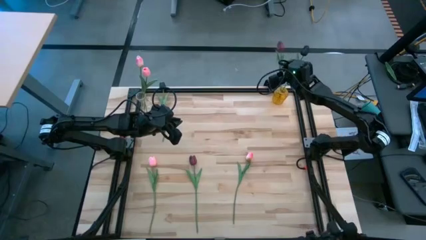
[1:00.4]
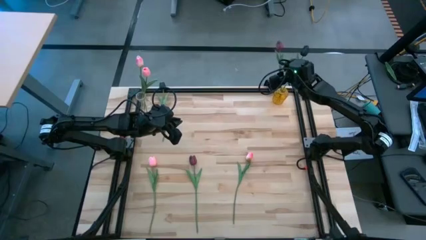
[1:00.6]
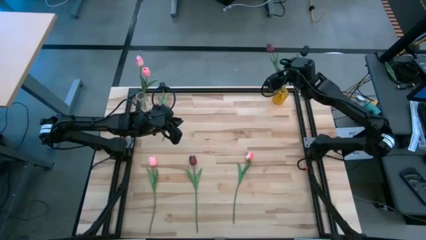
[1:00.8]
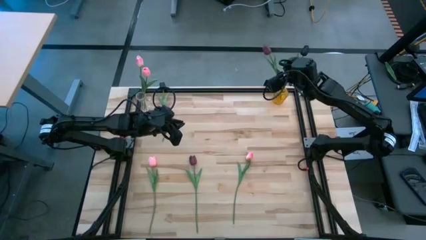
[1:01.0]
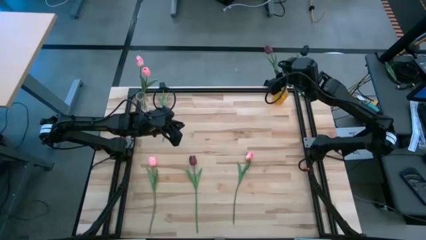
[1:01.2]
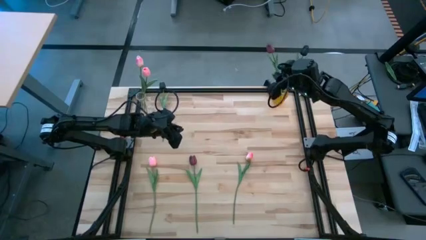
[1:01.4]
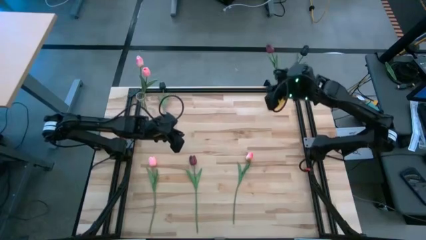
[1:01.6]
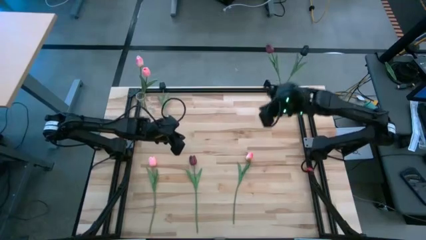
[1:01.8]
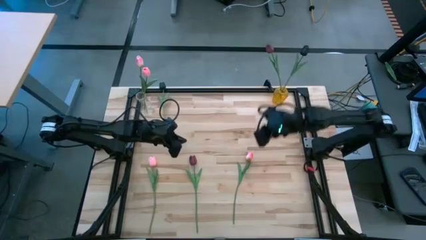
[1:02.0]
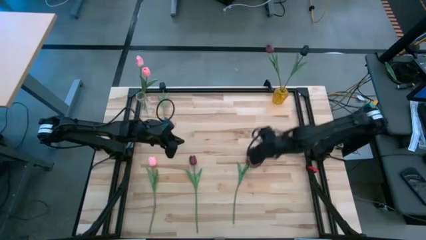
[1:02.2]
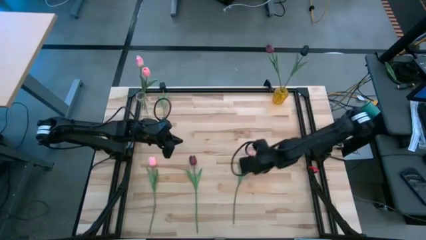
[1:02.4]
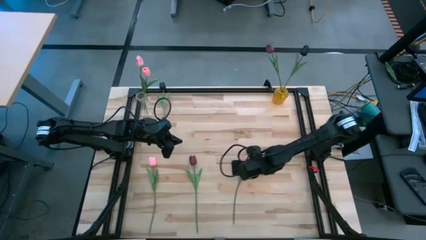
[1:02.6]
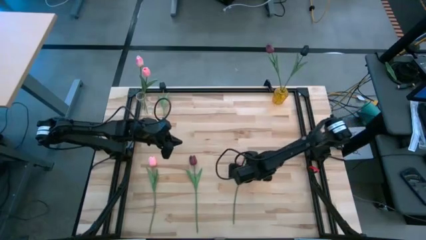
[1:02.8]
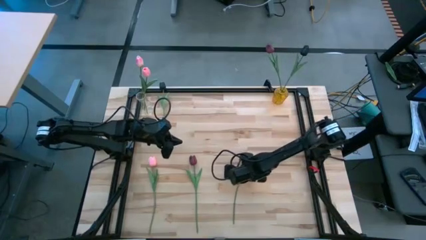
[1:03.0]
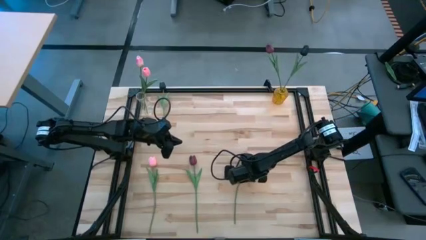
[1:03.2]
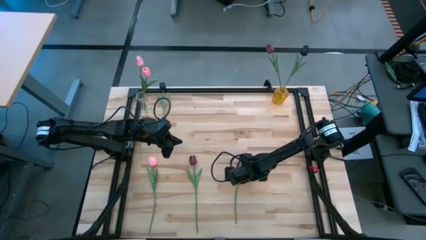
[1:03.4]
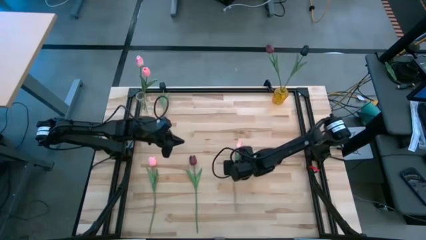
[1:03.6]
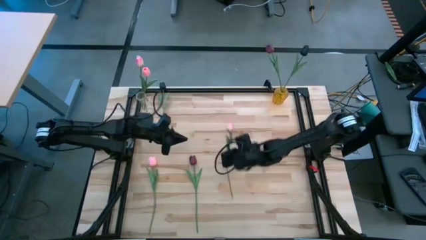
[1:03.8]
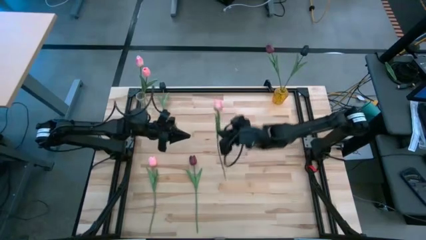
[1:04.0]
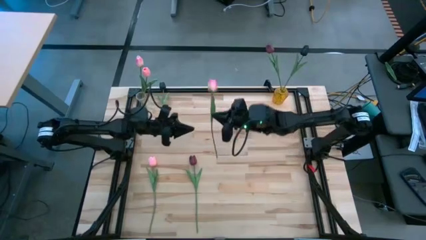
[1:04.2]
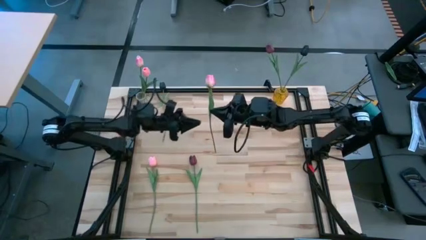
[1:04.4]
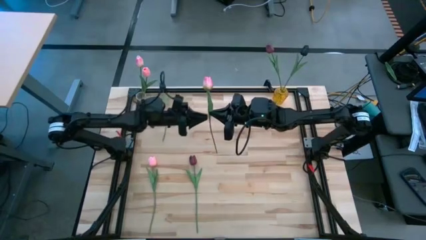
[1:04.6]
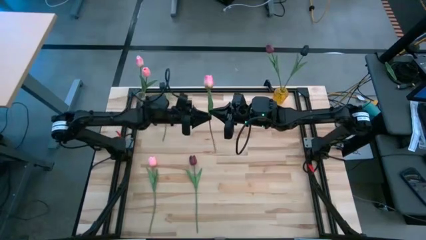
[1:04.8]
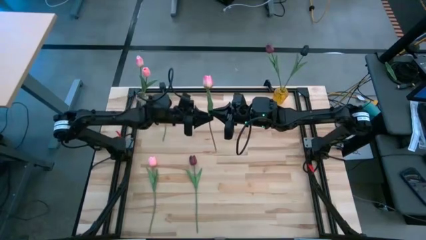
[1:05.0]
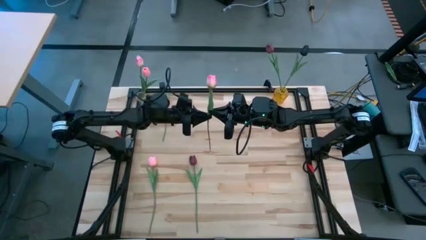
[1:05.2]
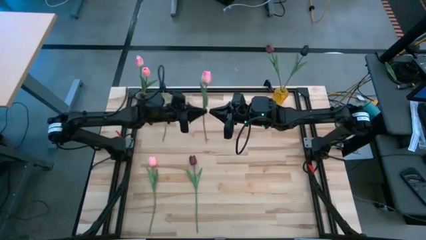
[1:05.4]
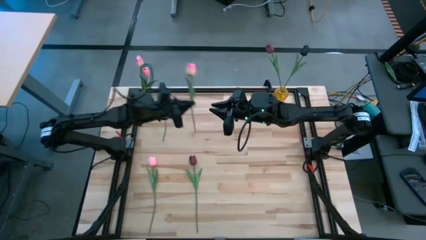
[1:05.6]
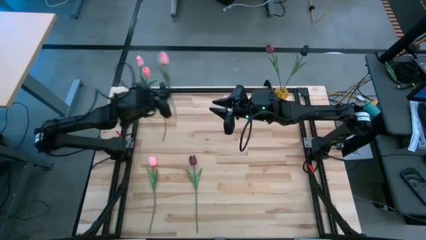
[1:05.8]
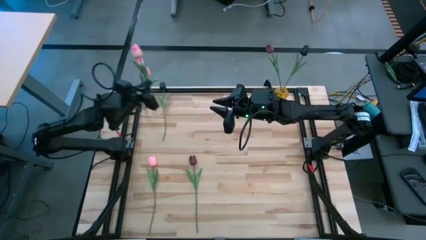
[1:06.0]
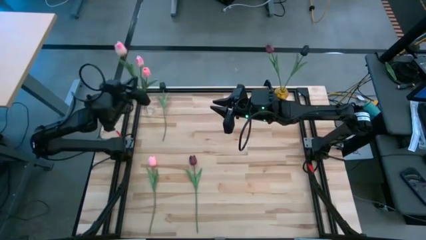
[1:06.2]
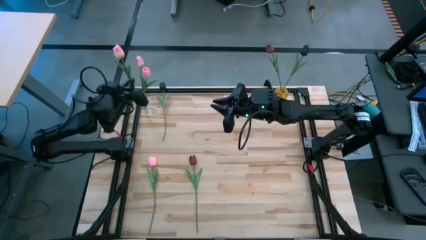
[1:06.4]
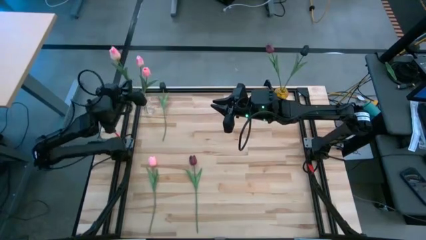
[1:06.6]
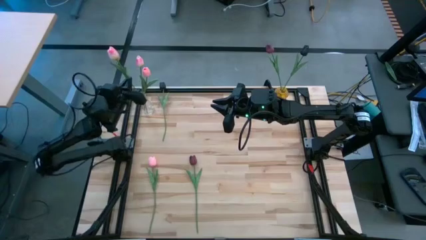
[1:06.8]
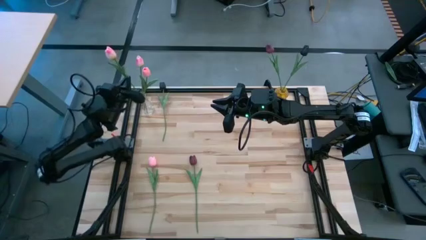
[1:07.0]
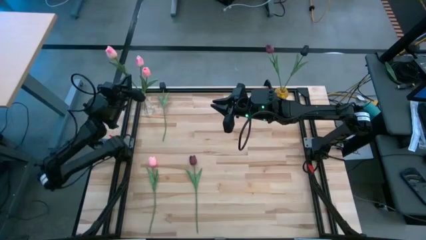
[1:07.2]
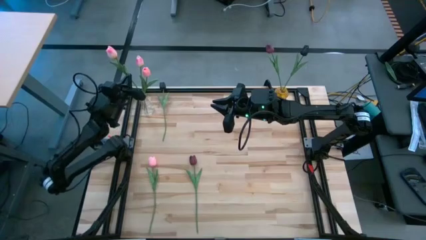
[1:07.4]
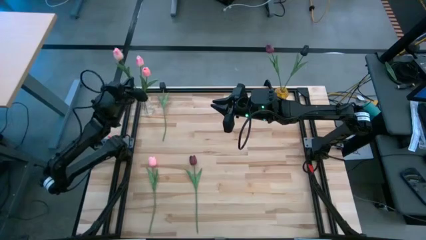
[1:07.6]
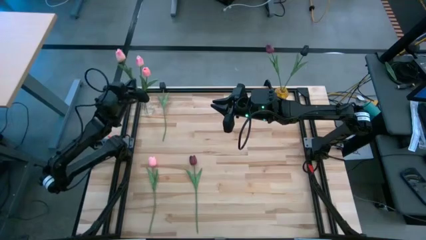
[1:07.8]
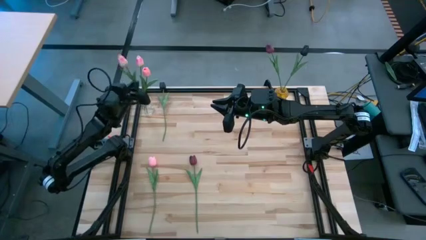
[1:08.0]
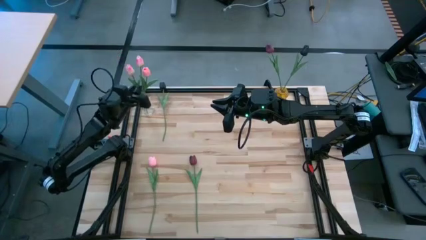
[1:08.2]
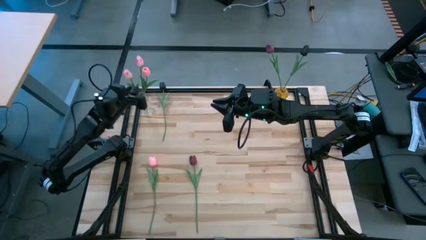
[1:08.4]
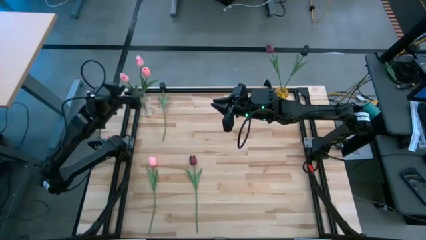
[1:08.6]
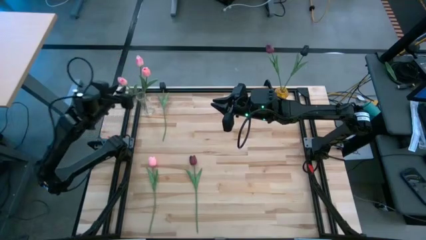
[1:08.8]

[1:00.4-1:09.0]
Task: Sort flowers into vase by color
Put the right pink flower into the transparent vase

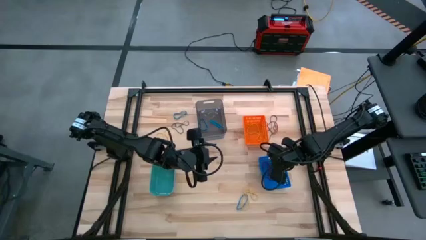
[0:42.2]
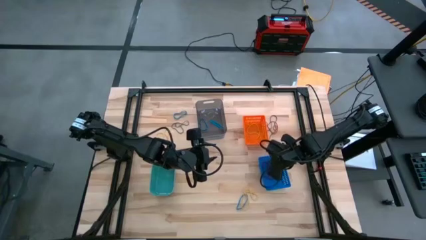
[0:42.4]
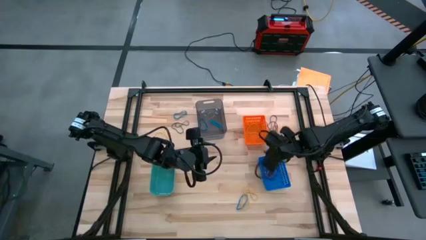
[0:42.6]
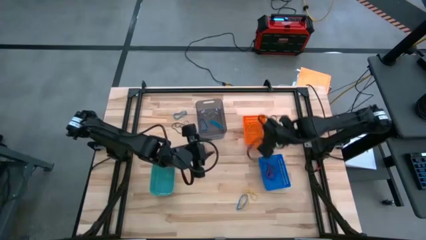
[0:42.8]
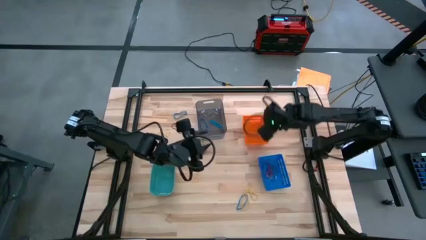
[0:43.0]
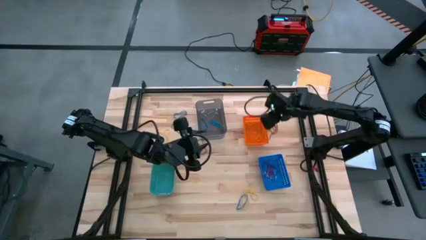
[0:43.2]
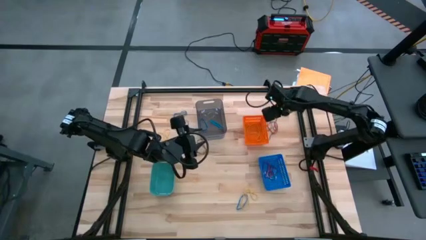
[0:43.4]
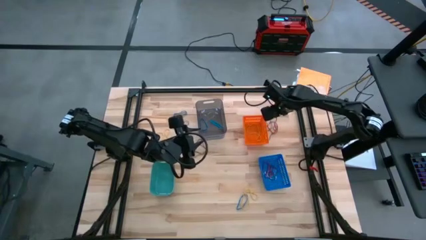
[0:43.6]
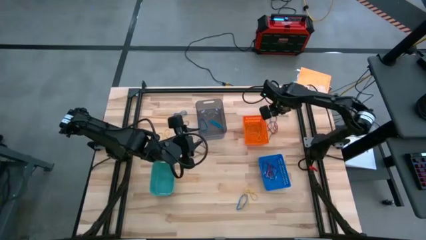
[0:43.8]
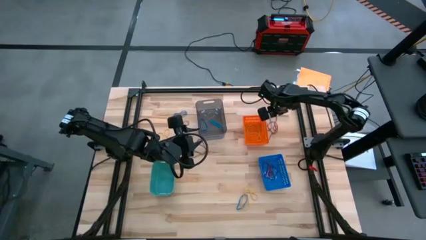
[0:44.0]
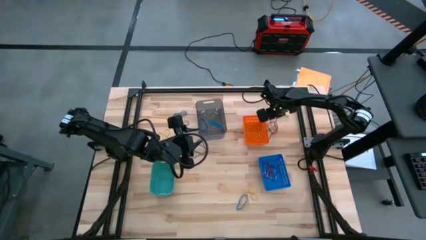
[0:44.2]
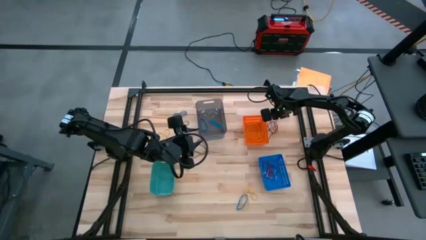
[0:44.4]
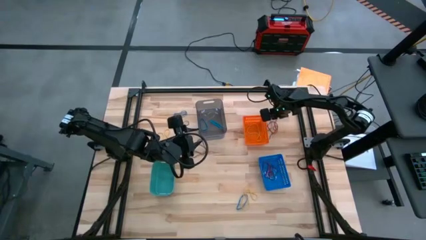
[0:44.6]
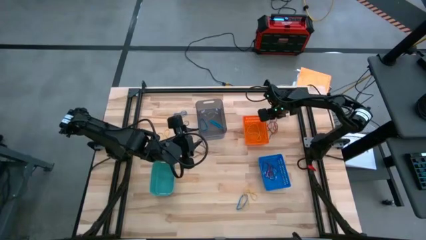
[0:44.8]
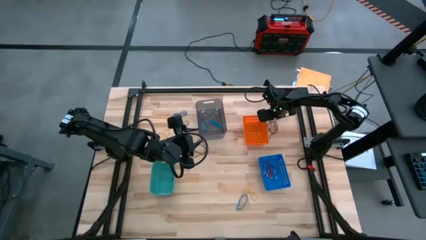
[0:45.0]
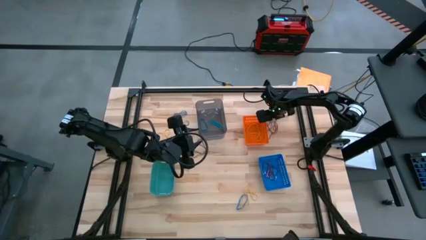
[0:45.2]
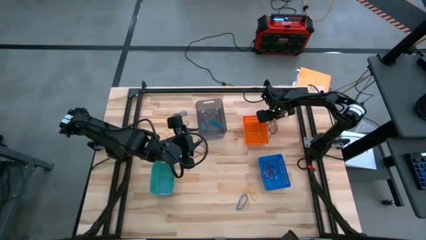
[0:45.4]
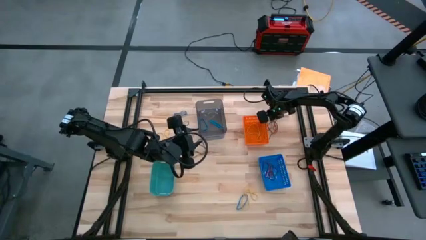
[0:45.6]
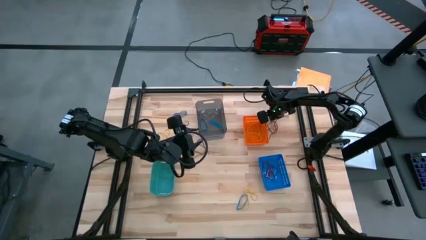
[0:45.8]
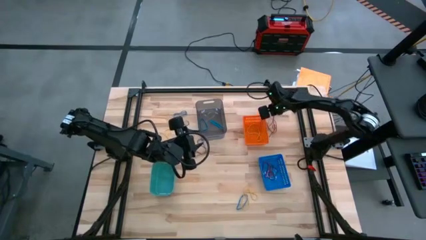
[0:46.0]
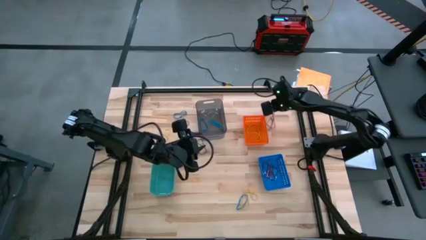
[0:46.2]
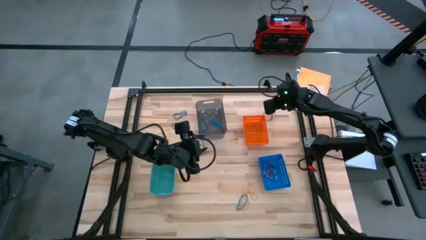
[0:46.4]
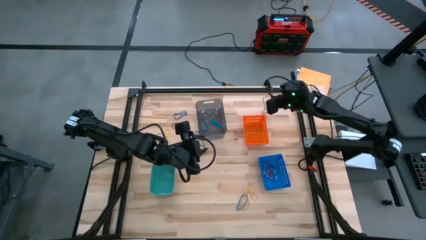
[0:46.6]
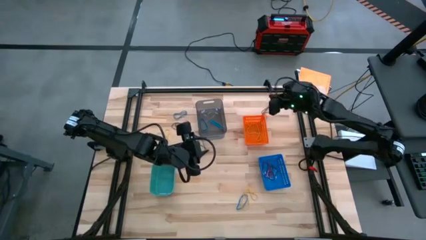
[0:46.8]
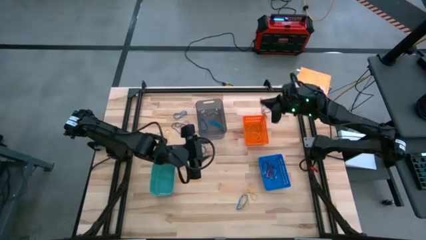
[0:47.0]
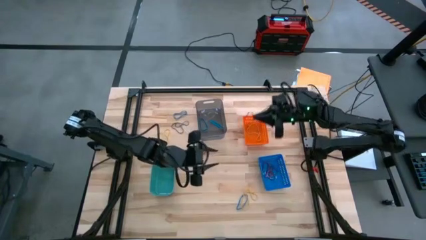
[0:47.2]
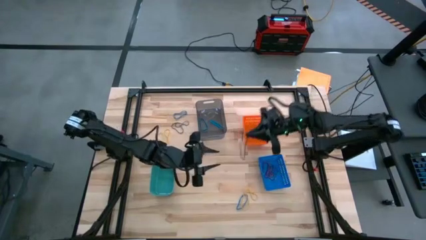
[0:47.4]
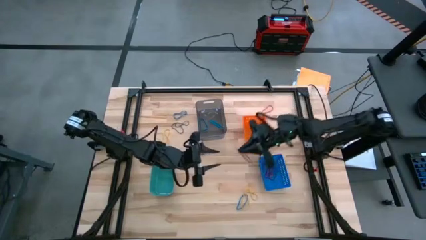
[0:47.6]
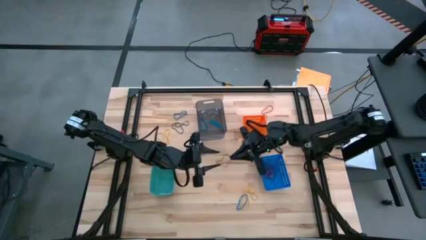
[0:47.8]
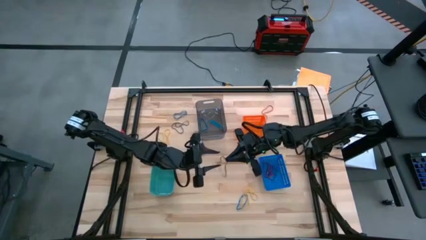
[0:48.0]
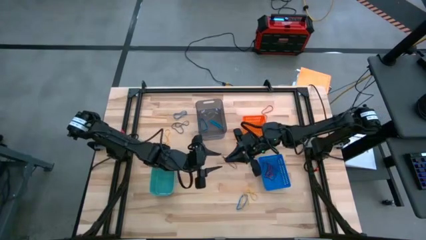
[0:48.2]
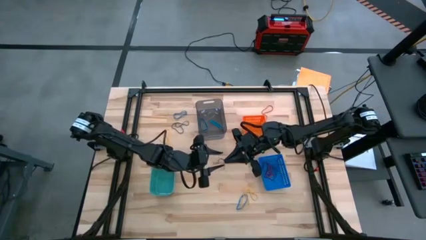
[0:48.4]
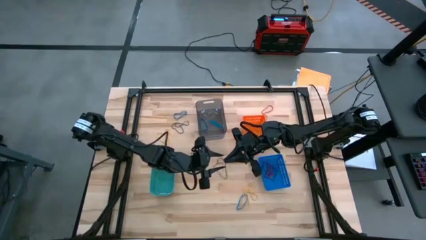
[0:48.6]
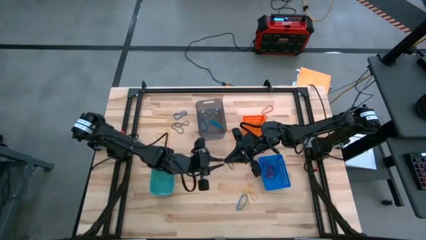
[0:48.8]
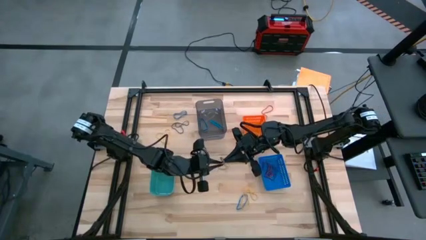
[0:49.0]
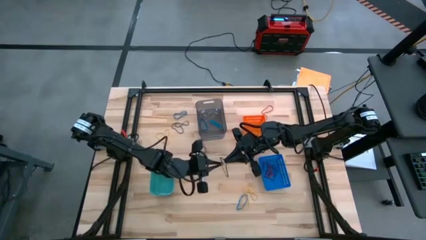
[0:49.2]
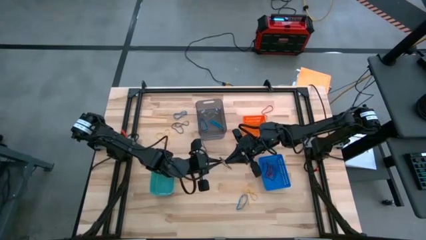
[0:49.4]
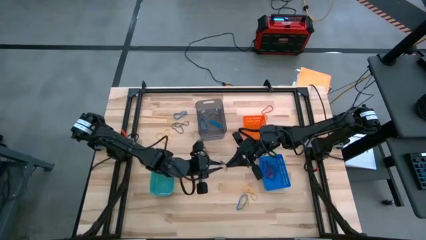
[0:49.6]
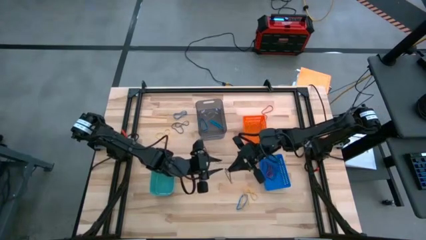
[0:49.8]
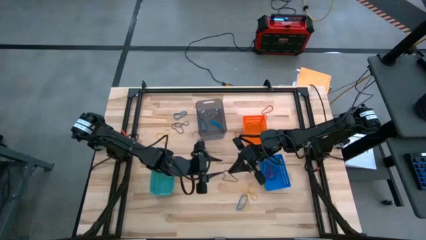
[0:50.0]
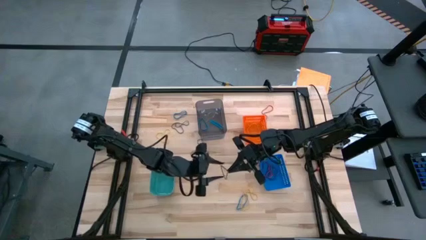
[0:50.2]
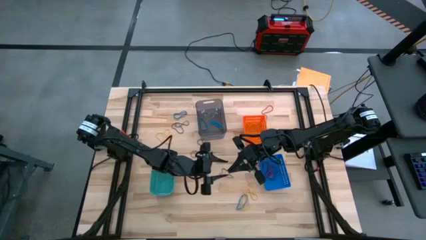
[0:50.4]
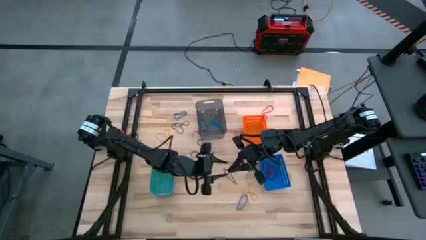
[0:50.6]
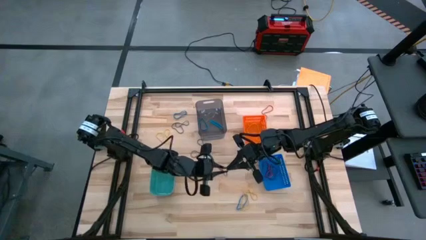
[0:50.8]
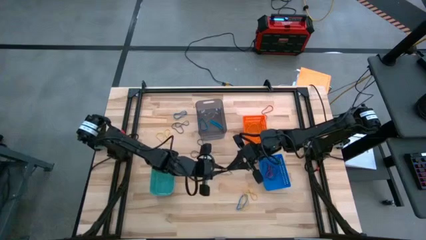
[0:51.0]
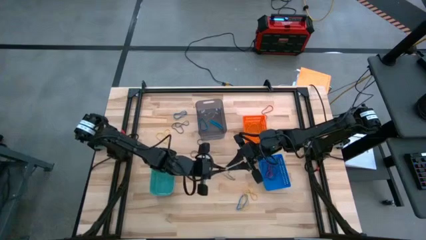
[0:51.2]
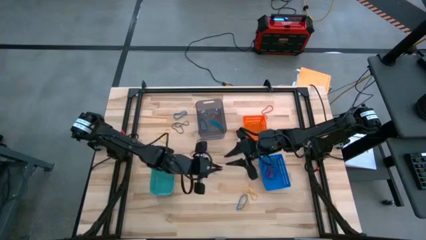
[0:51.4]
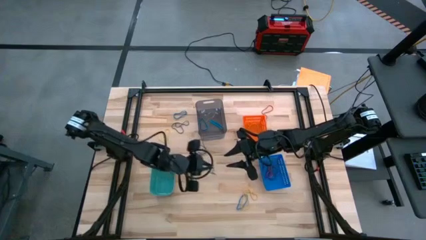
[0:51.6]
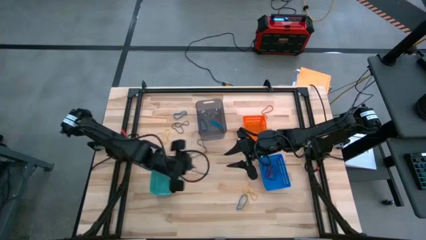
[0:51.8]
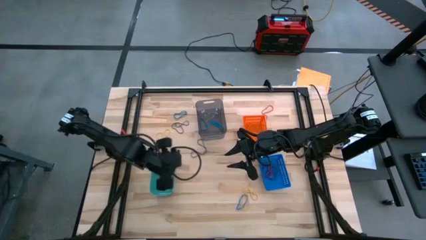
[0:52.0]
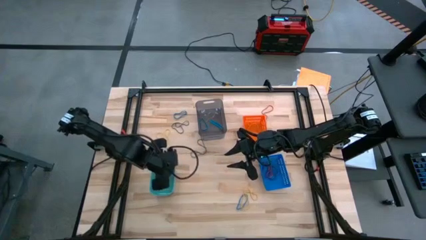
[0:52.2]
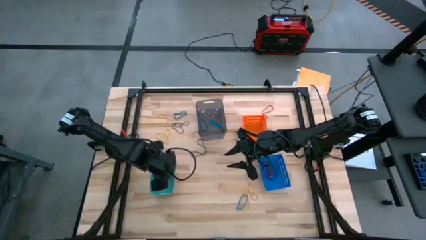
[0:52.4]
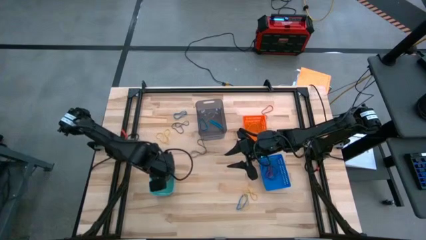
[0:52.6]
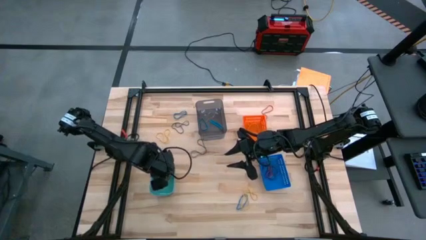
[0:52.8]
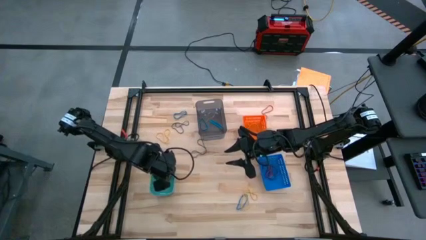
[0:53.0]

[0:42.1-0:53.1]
Task: Sort rubber bands into baskets
Put the black rubber band into the green bin
